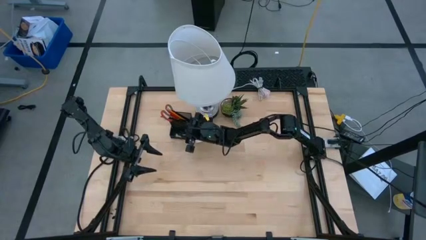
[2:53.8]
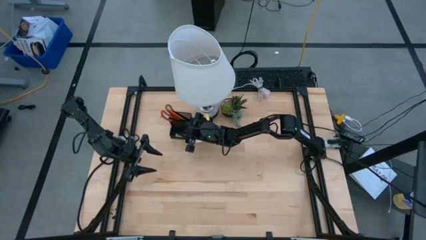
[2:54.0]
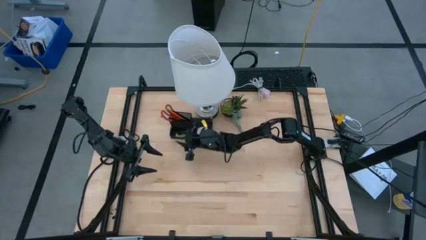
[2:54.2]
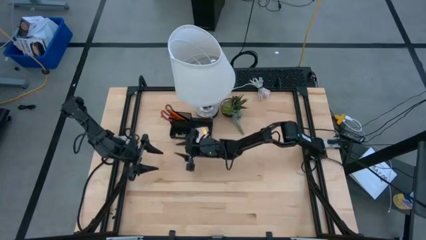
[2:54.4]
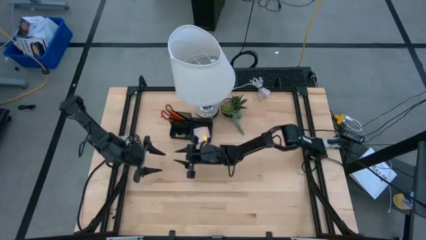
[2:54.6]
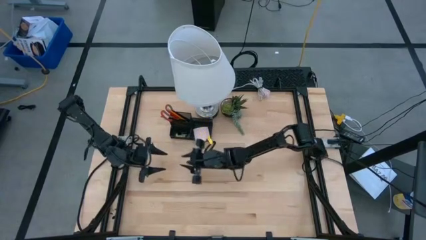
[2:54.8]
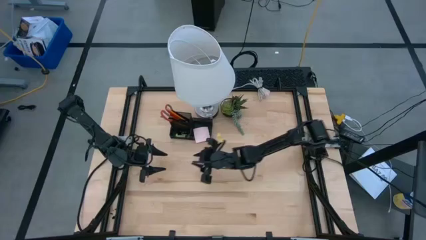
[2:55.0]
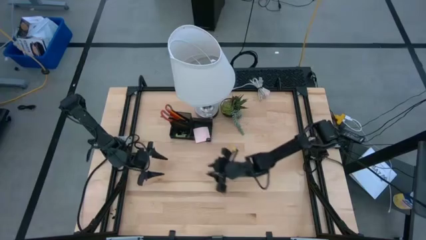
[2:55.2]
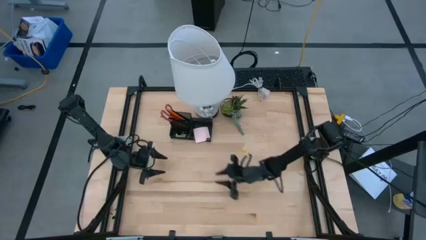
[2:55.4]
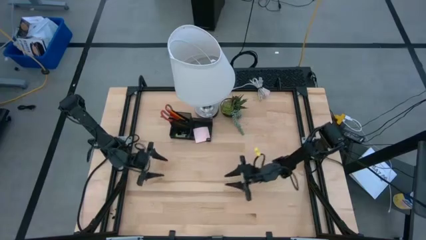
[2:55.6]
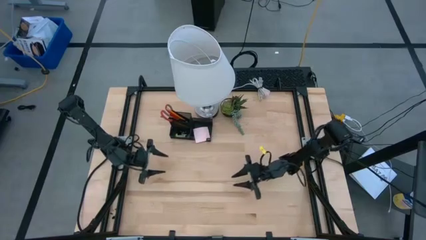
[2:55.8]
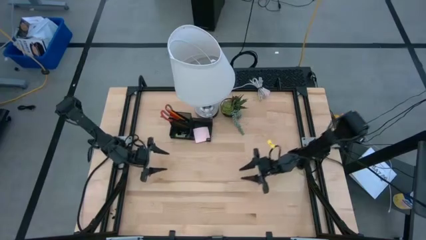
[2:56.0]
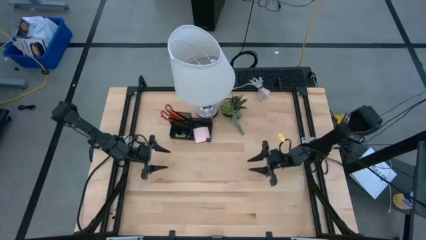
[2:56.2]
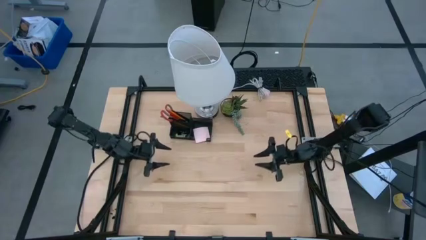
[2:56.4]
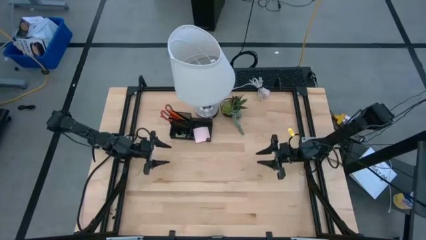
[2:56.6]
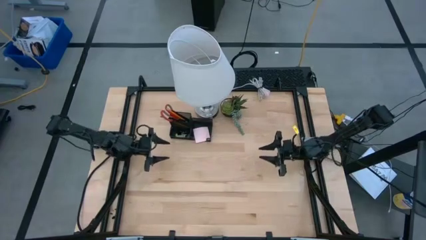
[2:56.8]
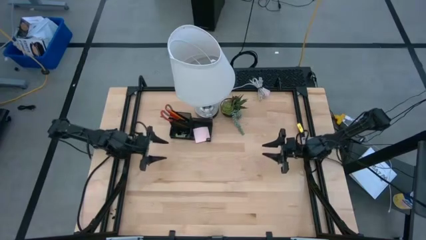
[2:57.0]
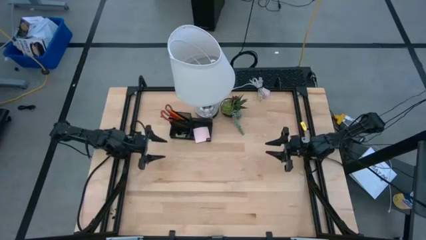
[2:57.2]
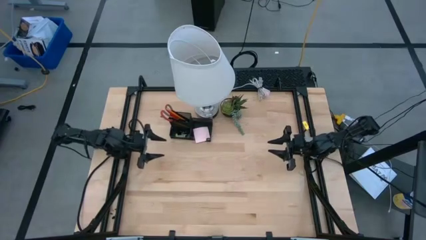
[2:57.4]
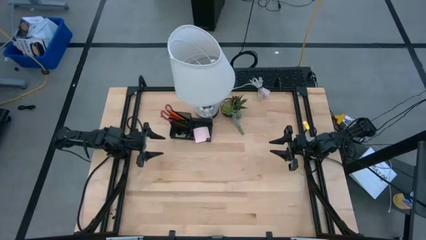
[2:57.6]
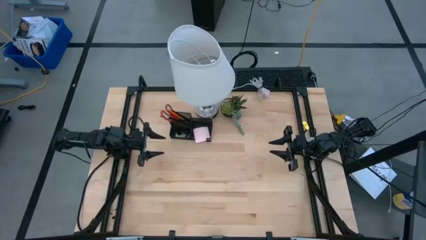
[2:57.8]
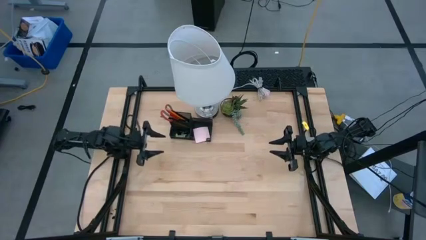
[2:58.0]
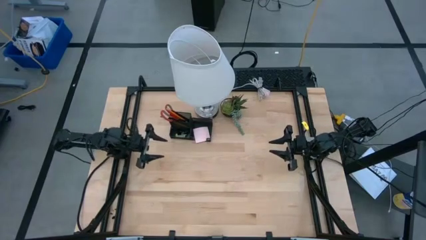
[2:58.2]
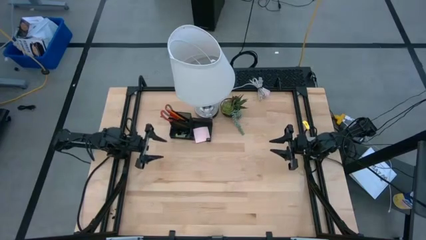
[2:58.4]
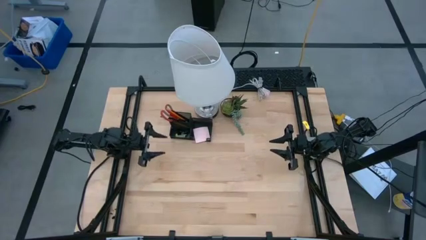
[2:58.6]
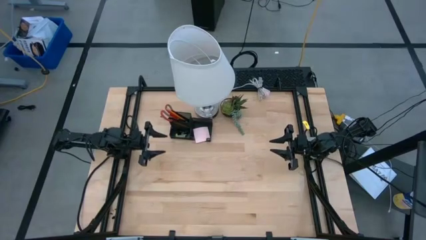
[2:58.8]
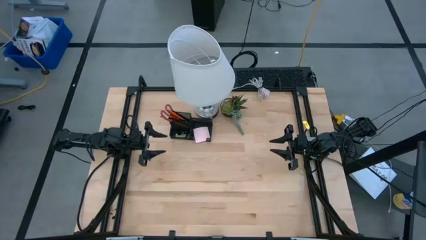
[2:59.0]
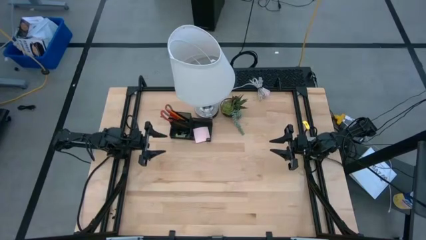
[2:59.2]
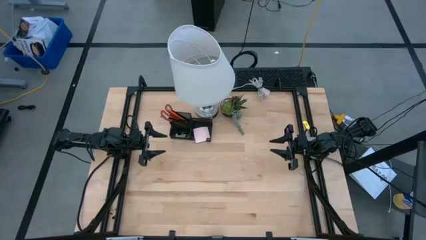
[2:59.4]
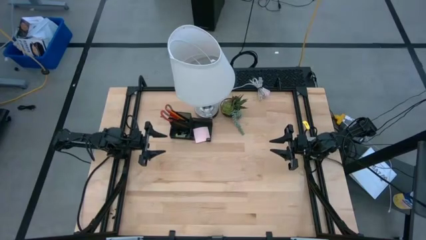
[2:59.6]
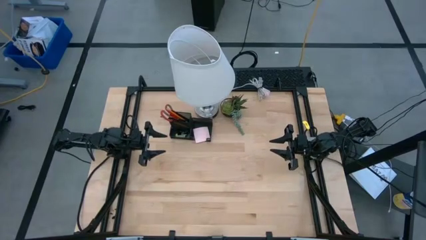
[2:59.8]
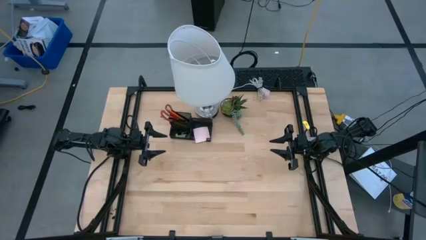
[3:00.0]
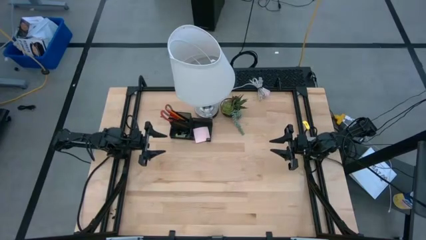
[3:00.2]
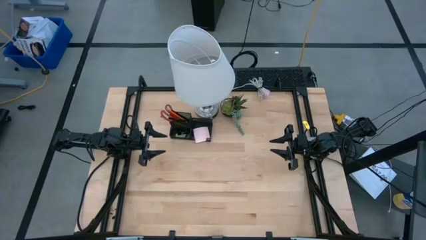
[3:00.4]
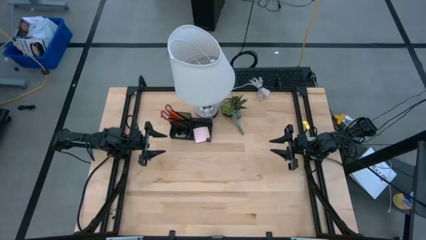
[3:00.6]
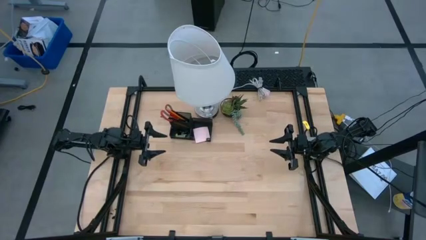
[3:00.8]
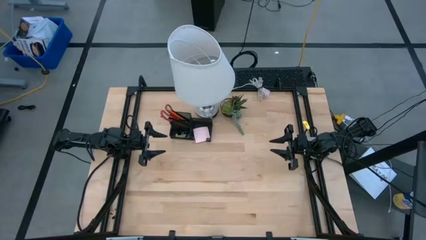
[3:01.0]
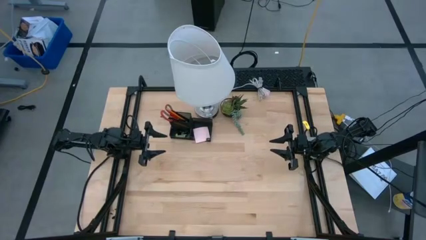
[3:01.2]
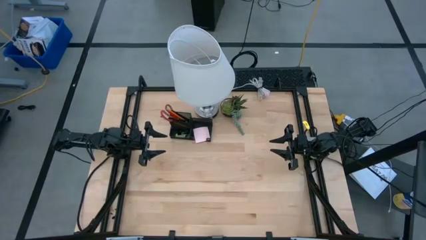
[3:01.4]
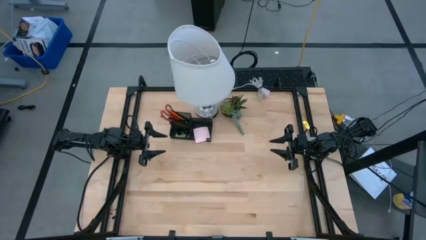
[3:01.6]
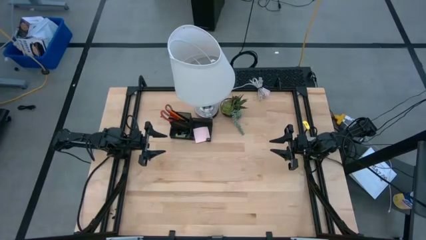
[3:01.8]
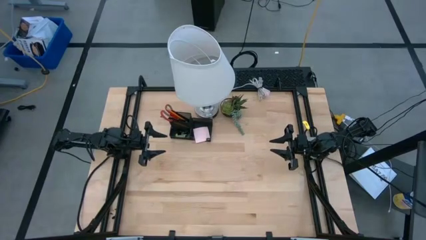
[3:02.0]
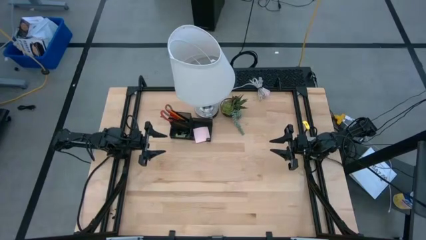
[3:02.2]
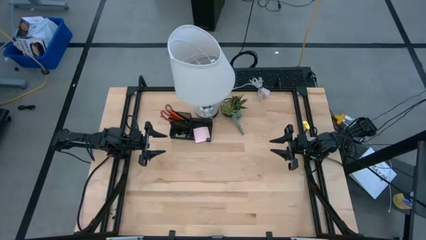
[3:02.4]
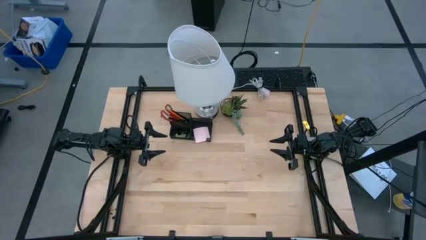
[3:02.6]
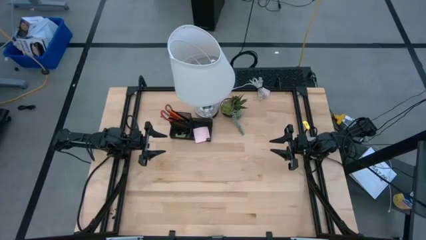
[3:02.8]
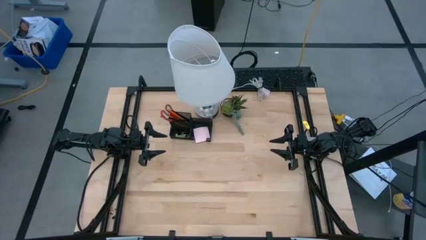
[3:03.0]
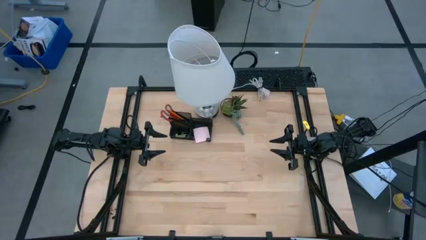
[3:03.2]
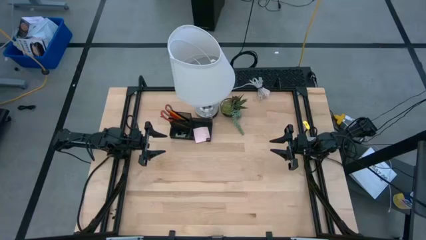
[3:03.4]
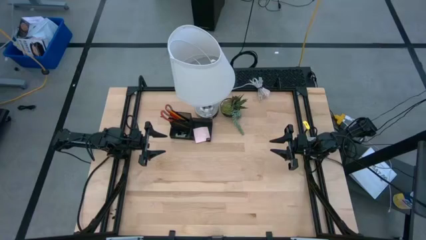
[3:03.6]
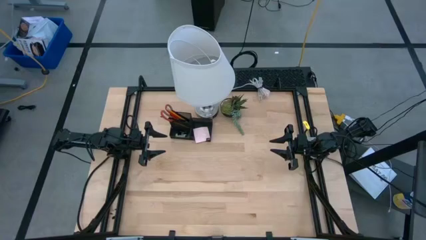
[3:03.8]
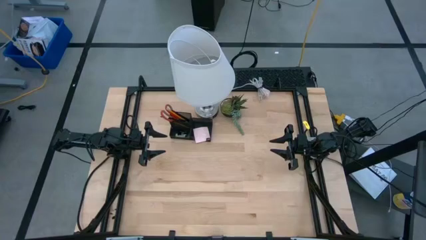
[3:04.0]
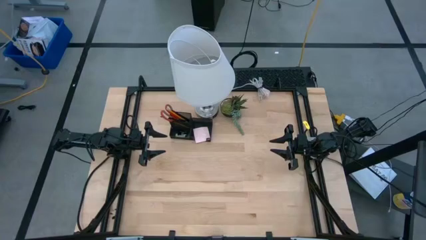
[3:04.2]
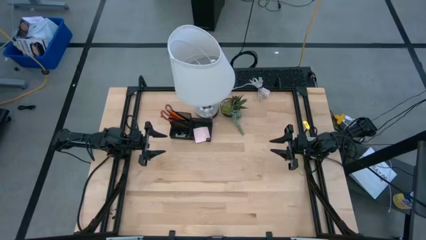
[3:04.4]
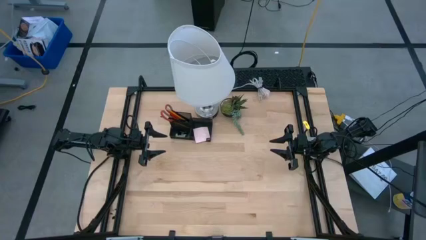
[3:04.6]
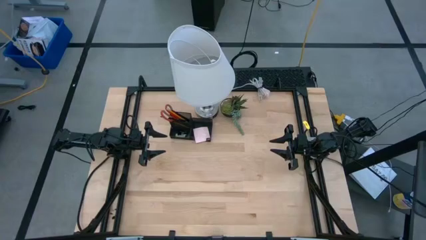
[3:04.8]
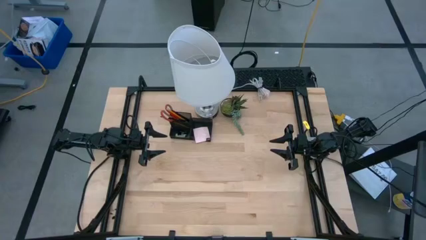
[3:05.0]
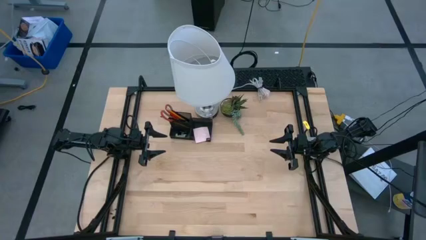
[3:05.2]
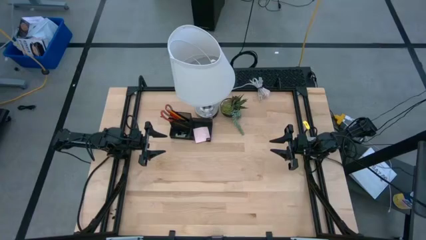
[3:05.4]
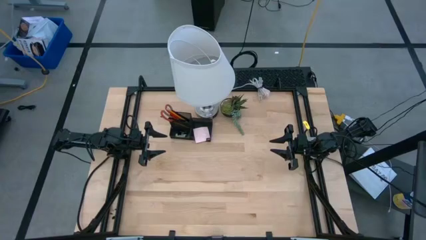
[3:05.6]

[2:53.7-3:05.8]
Task: Pick and place office supplies into organizer
Return to Home Position

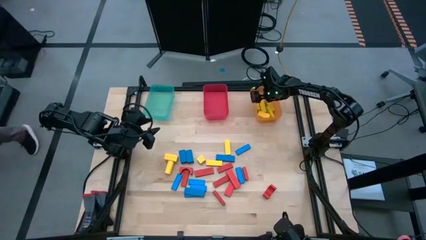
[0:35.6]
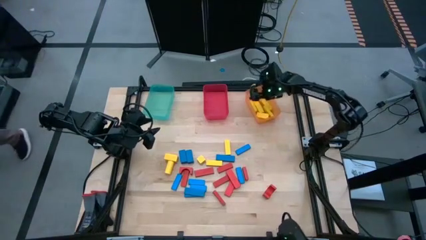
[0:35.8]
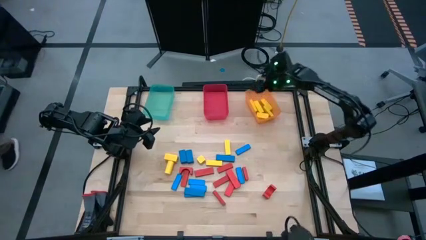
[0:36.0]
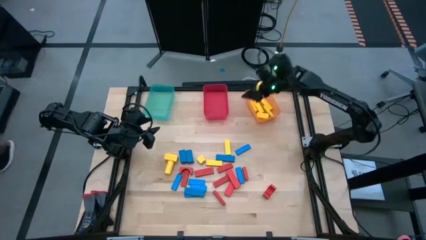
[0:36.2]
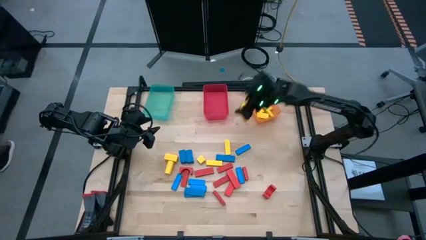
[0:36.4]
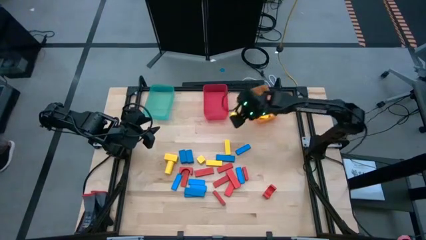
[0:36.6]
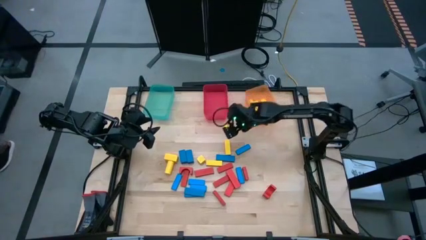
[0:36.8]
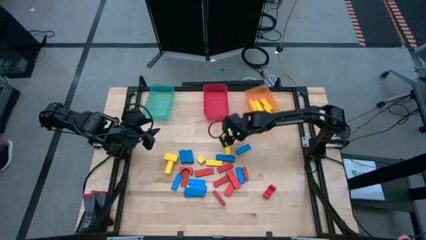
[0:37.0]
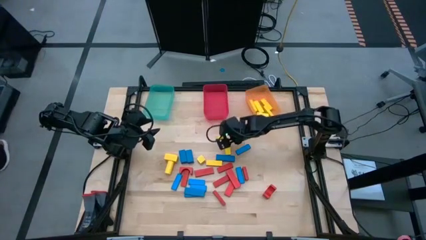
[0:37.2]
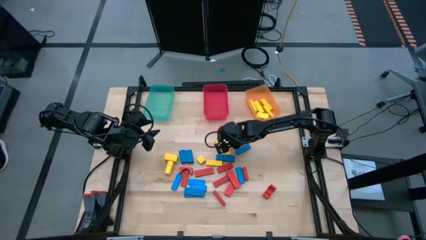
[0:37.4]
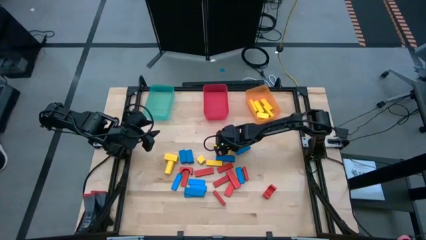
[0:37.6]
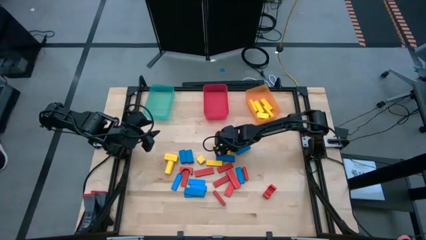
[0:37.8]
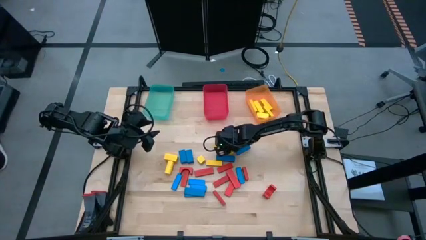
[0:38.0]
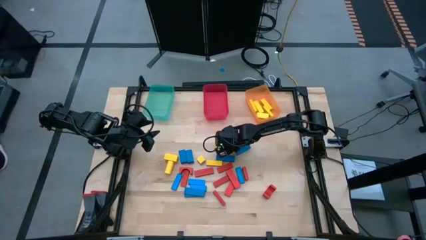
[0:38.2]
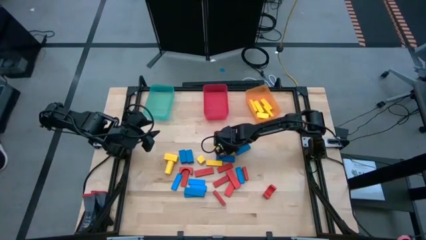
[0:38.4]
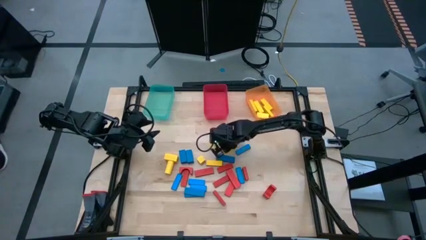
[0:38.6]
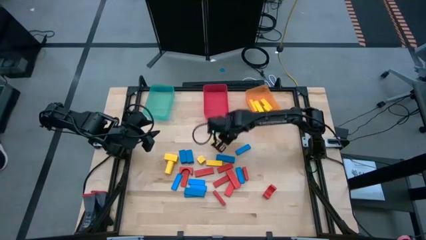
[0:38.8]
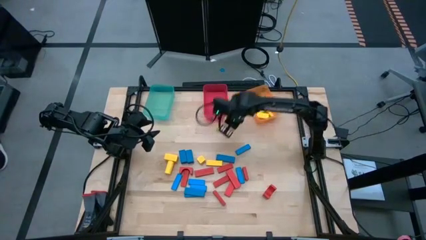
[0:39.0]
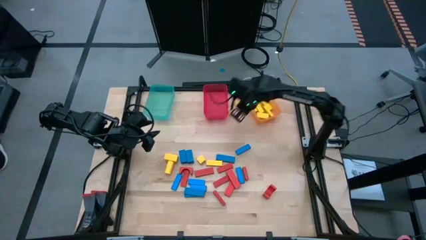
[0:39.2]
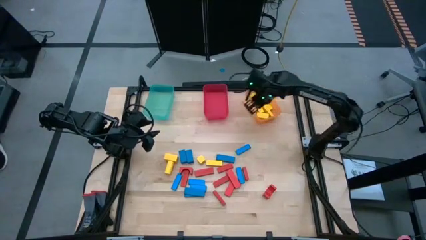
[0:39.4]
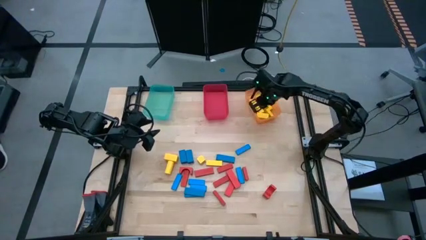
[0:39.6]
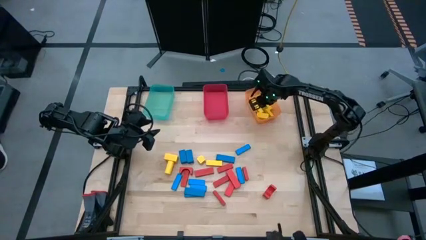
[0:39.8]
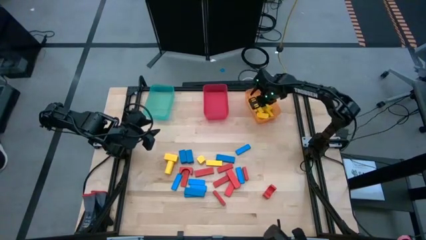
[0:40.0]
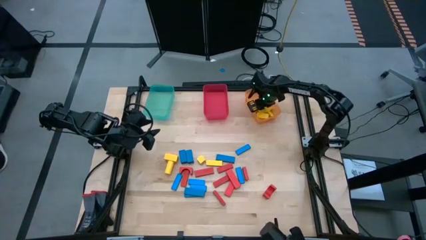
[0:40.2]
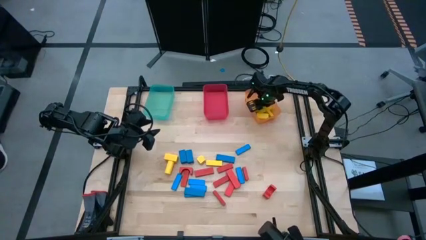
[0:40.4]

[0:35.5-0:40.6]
Task: Sort blocks
Put the yellow block into the orange bin
